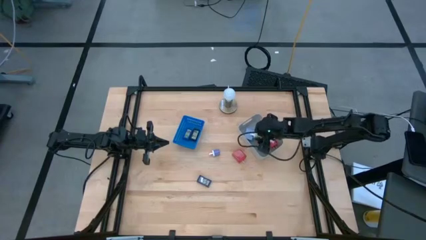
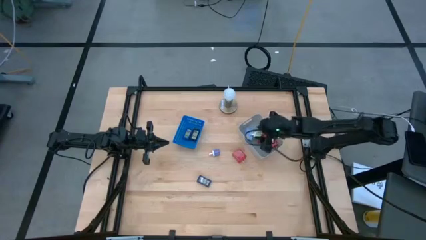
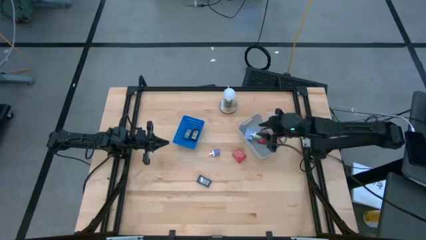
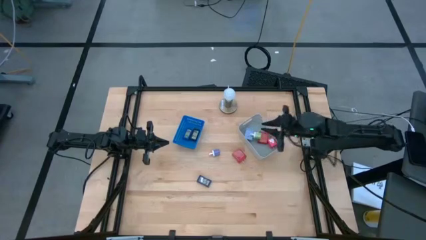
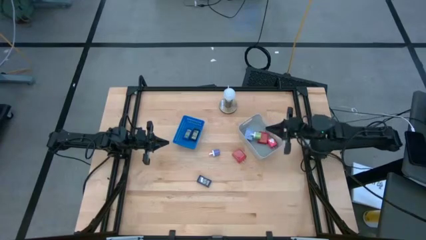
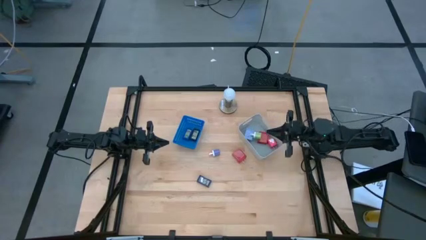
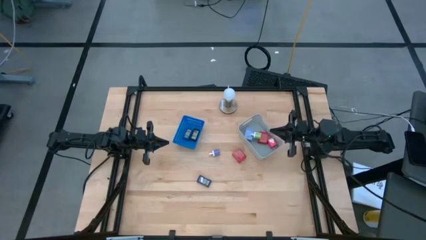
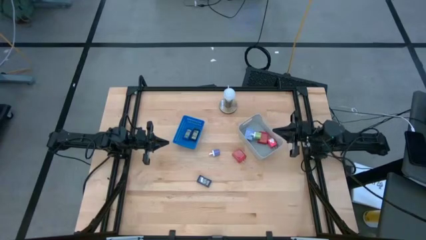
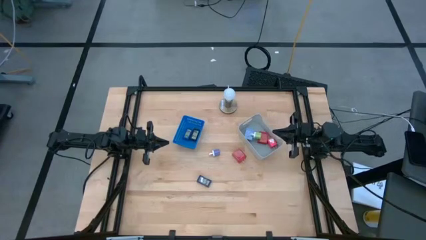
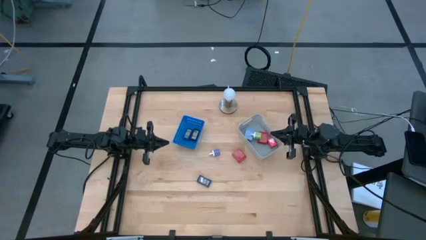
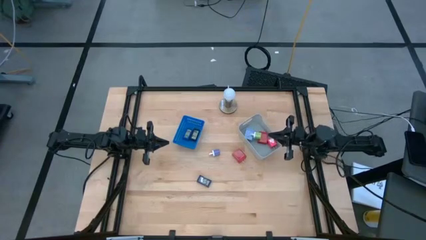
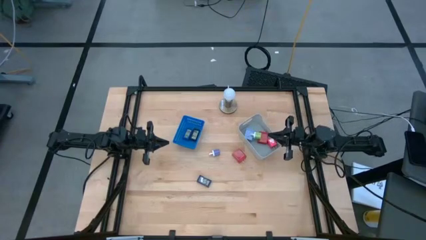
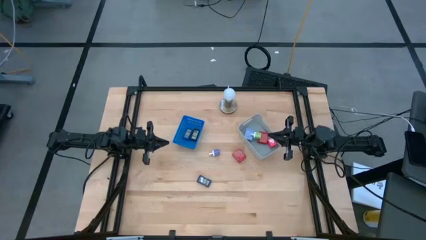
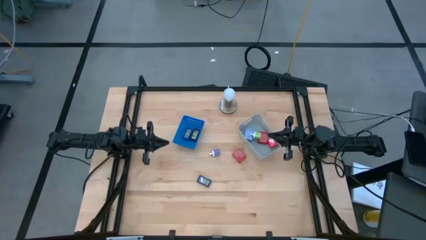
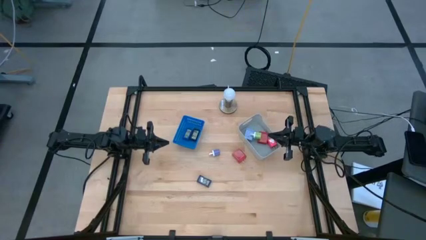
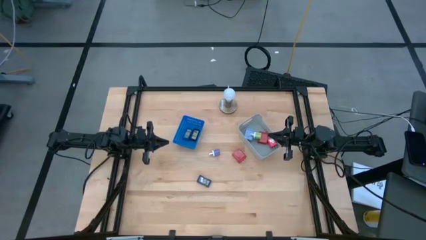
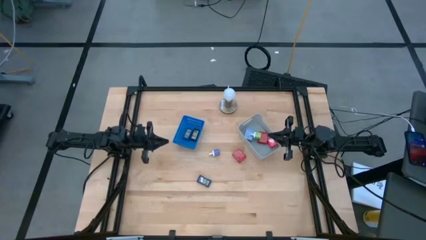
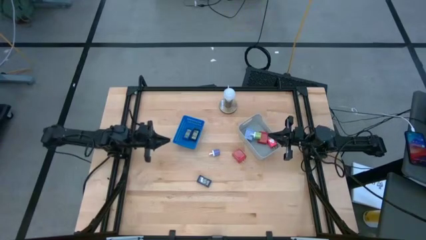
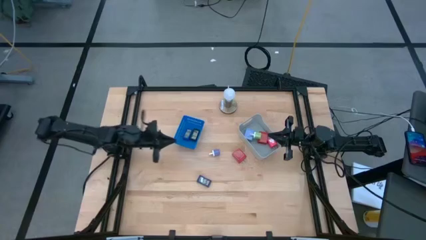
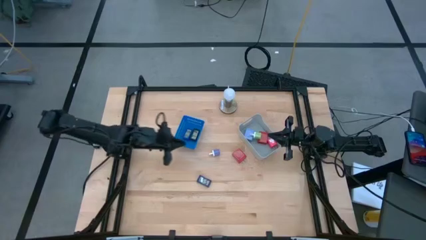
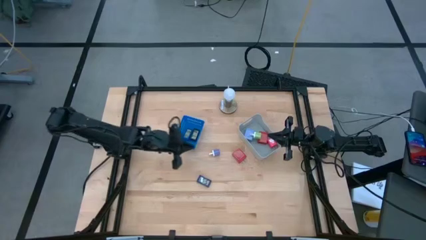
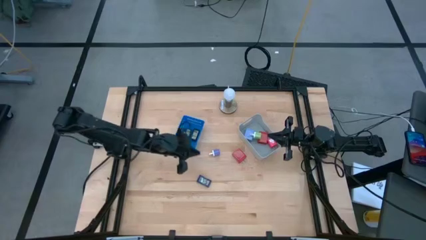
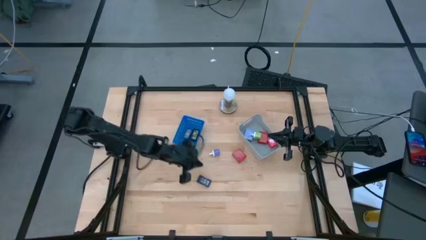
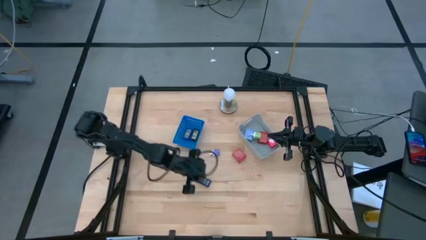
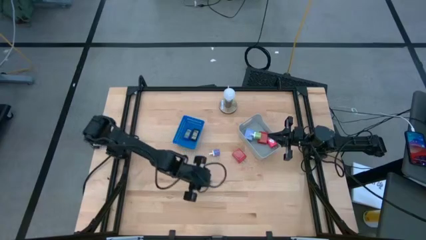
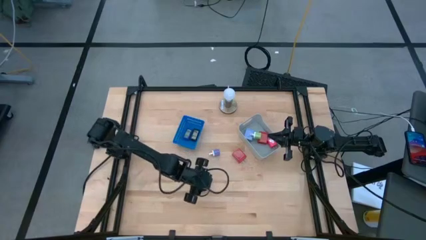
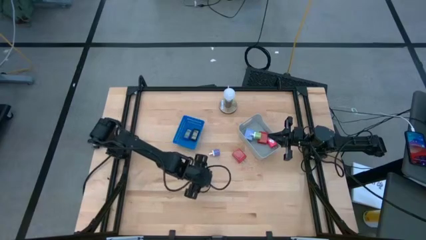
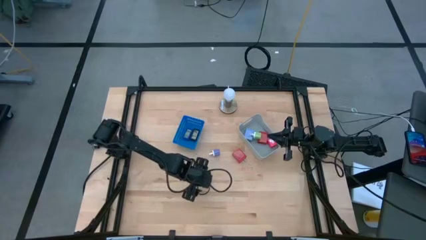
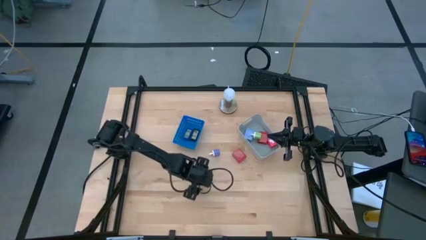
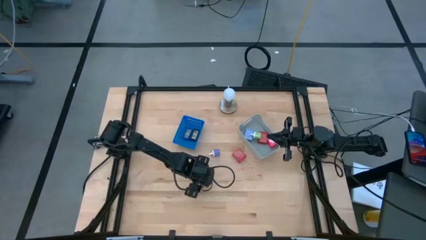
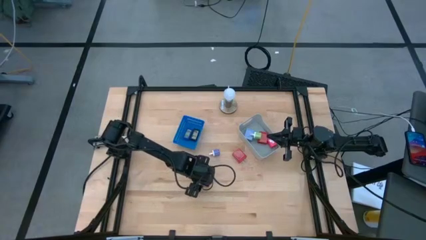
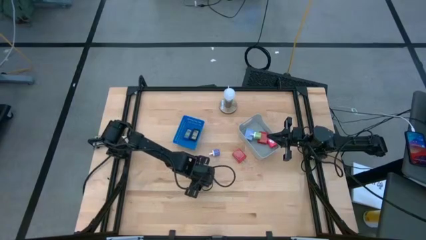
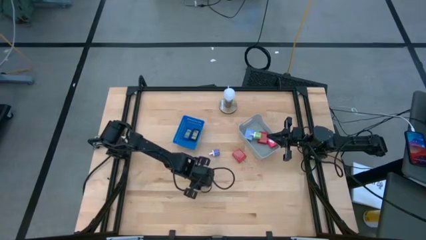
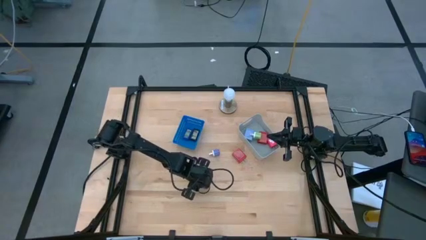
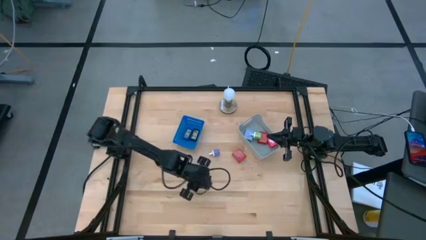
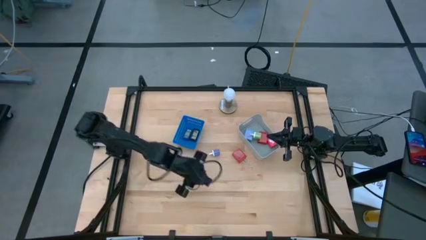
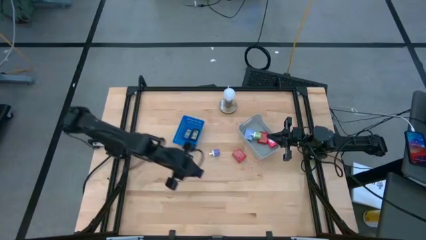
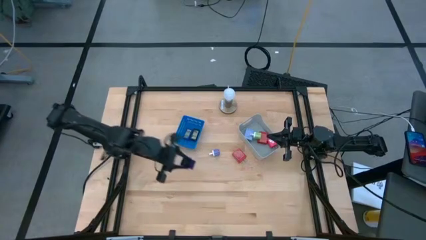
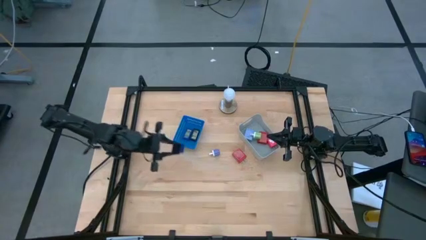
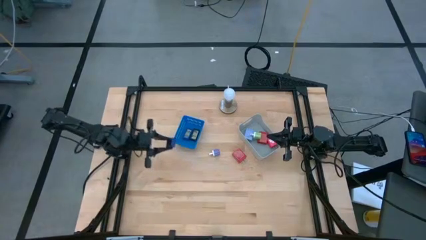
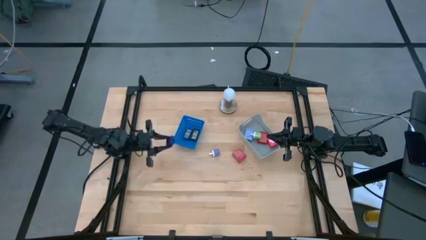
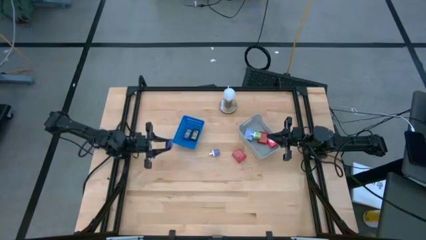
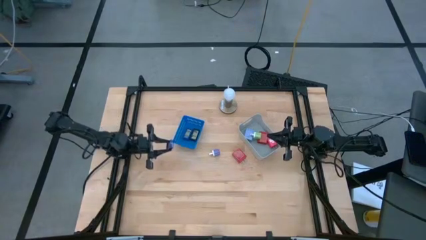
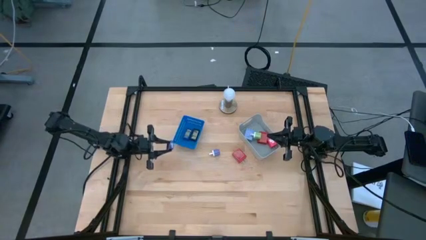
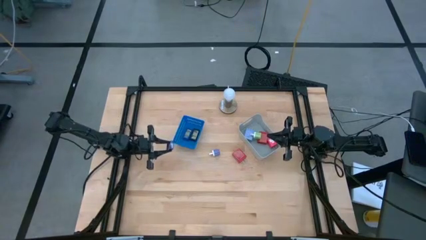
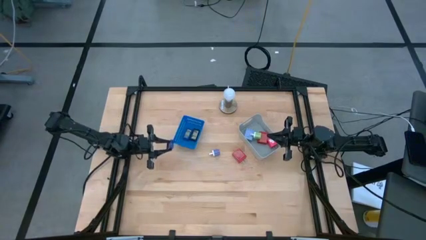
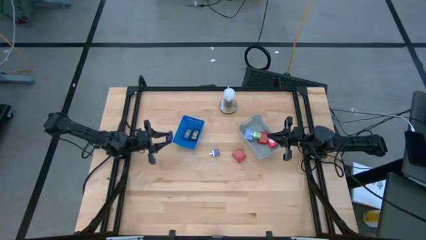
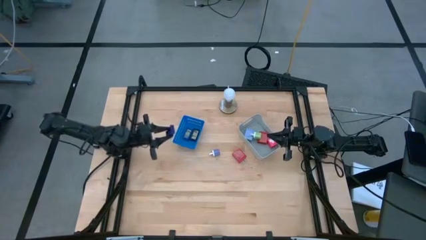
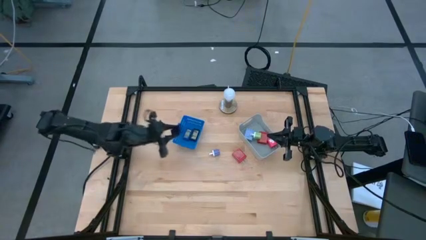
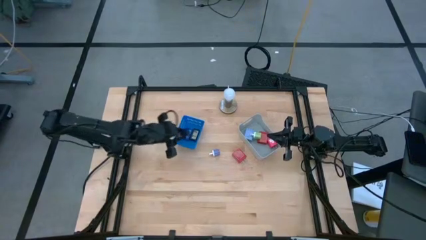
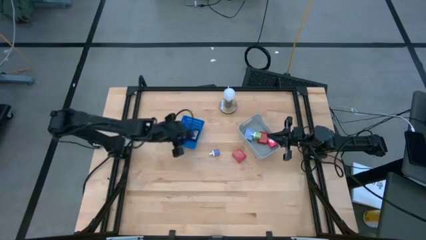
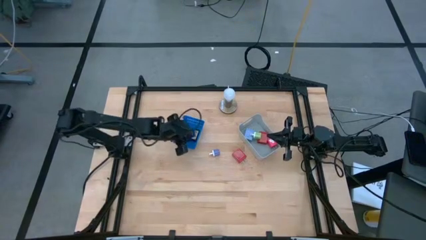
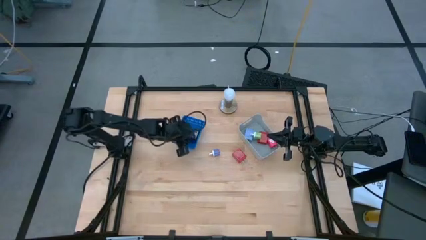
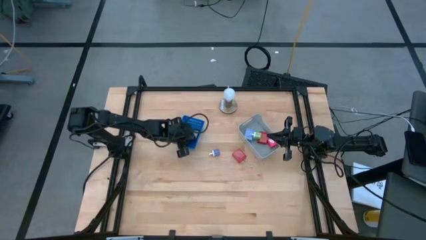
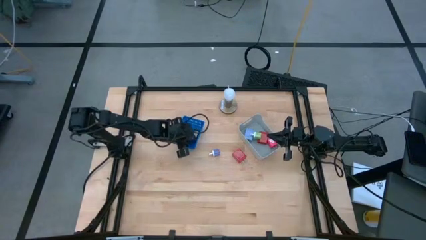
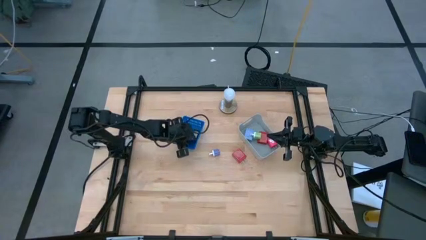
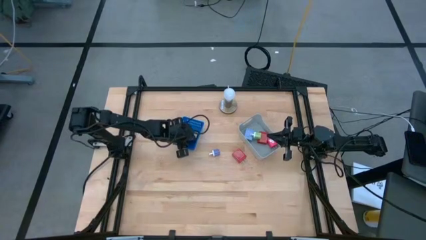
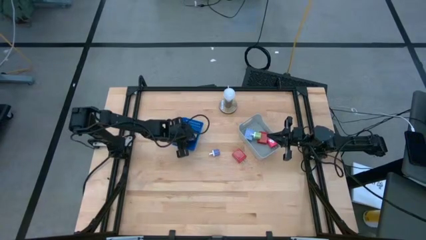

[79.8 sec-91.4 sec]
Task: Pick & Place Office items
Put the dark blue timer into the blue bin

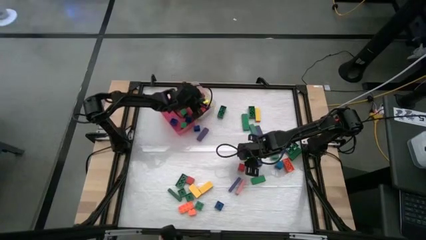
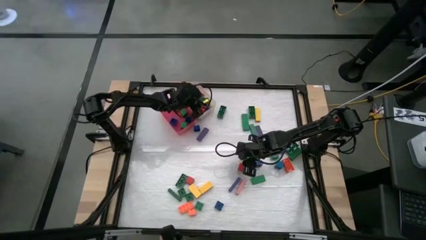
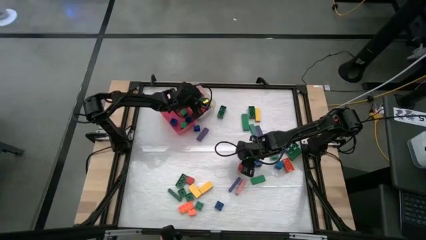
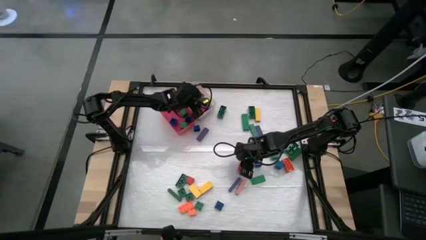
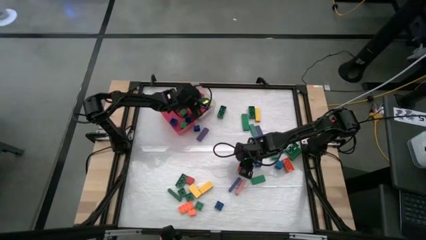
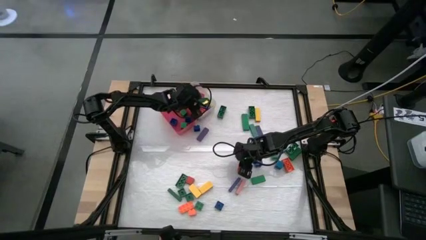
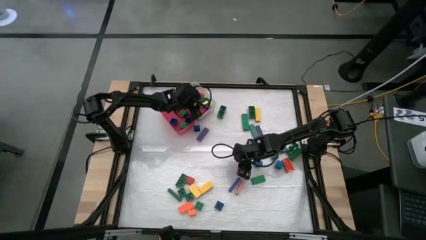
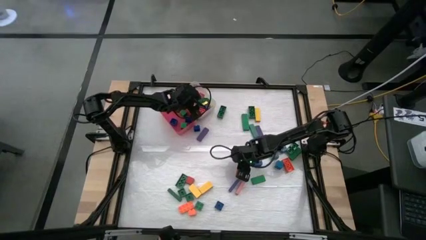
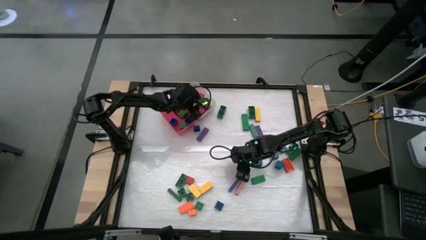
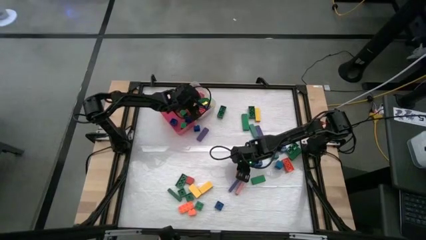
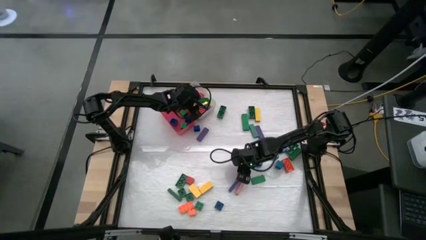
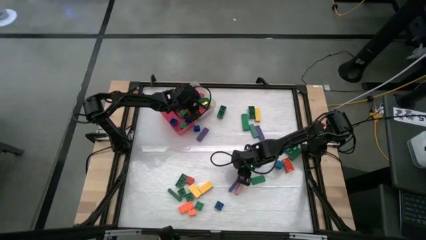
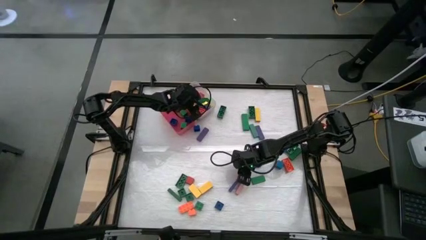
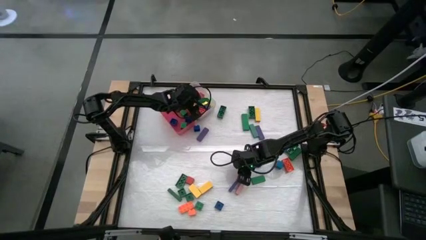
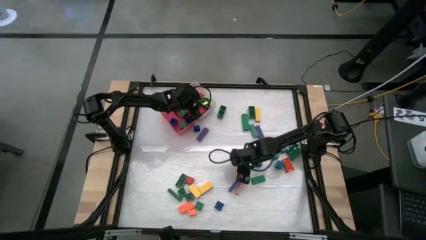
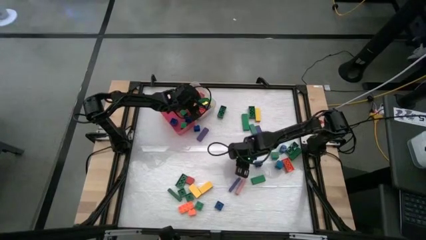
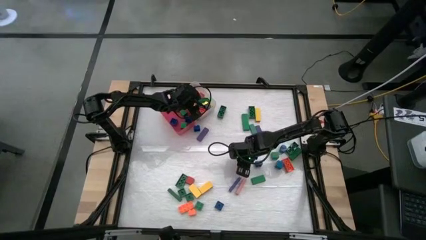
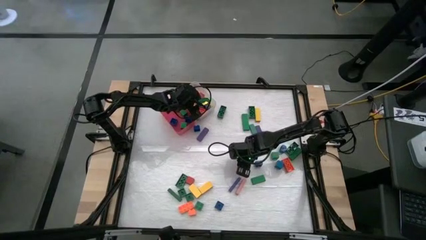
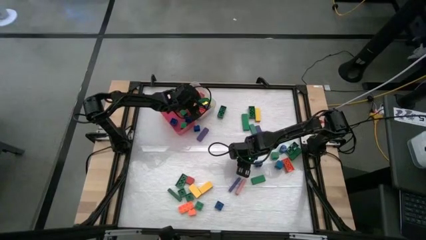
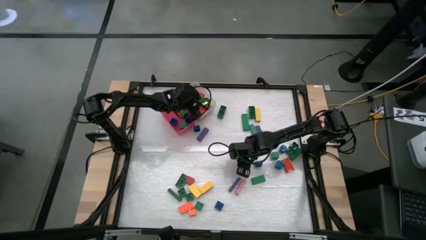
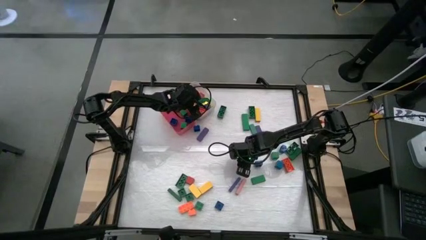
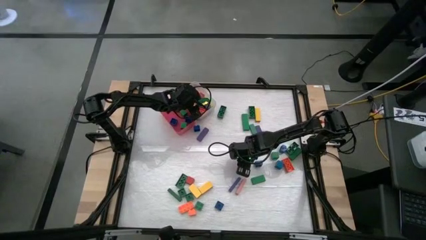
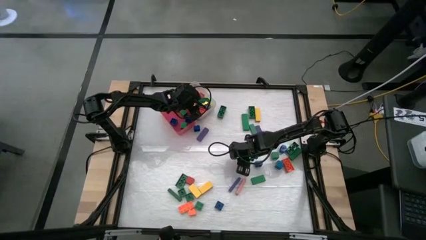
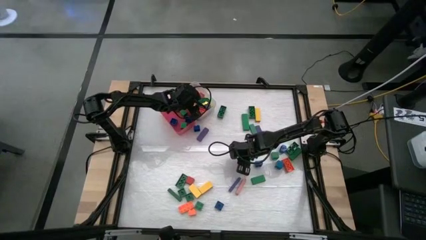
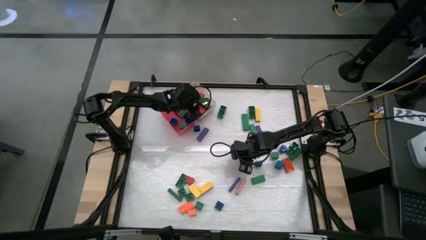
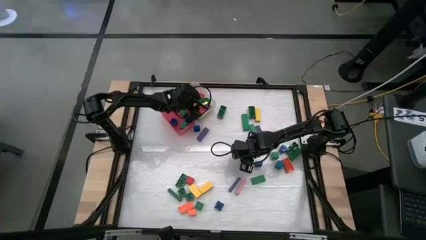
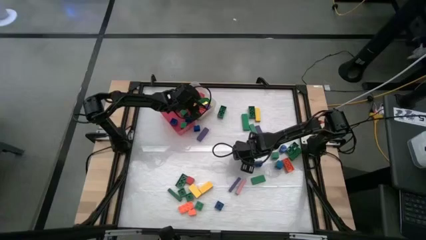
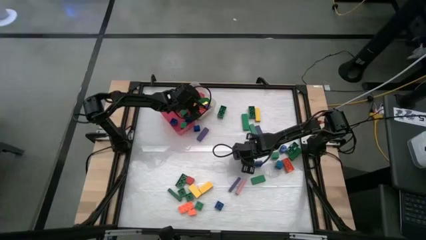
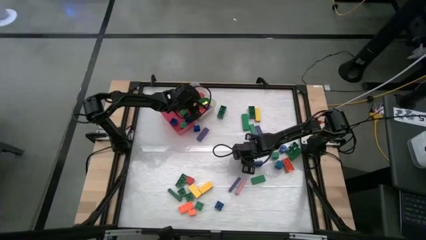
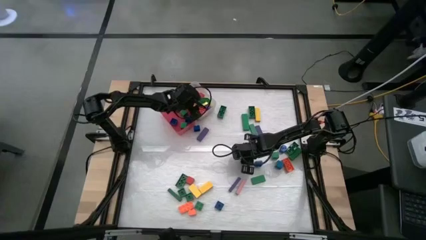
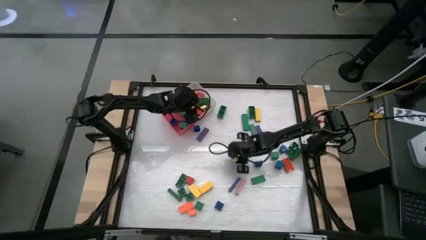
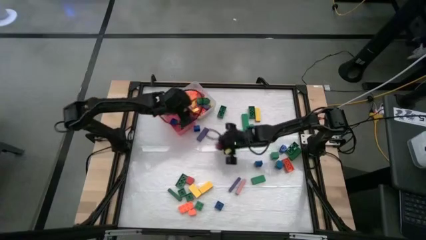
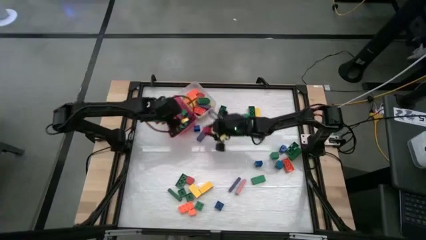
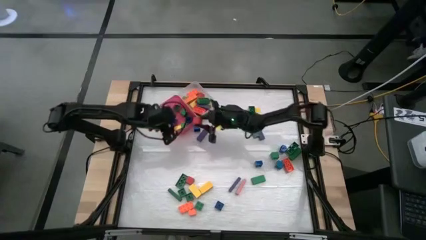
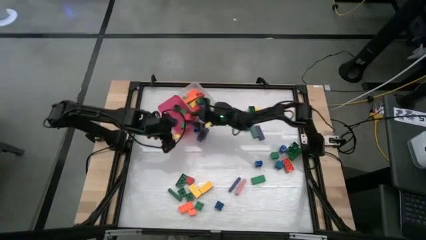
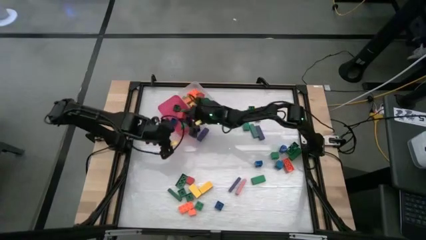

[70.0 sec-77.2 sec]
Task: Sort blocks by size
Put the small red block into the pink bin
